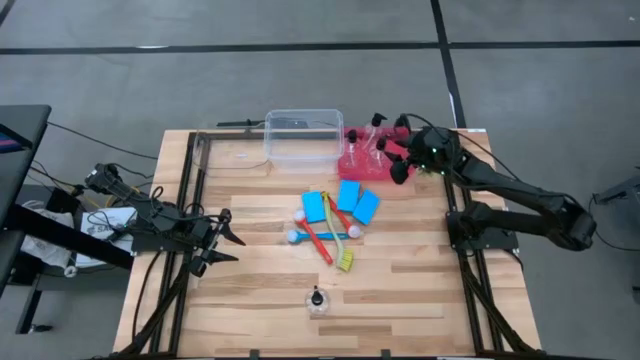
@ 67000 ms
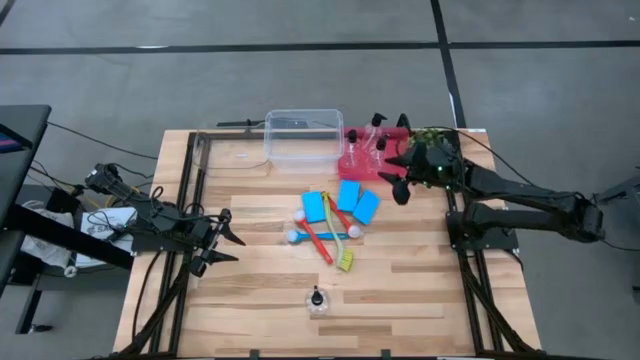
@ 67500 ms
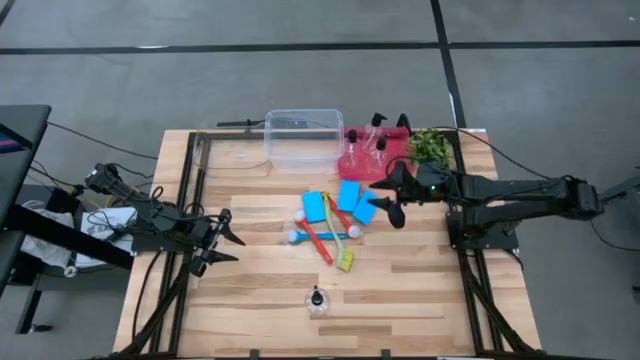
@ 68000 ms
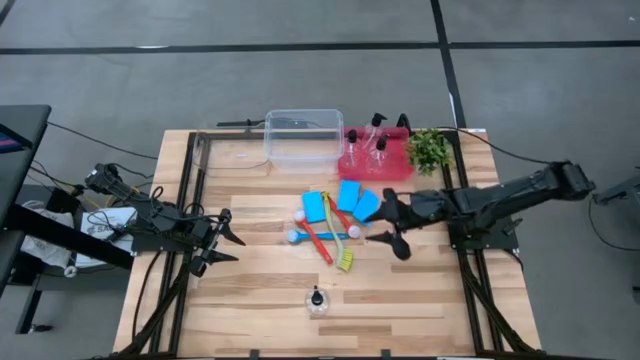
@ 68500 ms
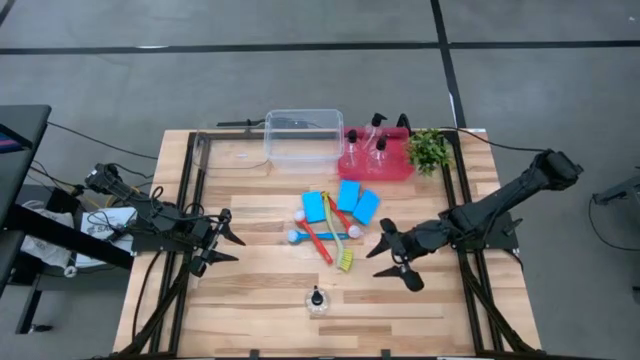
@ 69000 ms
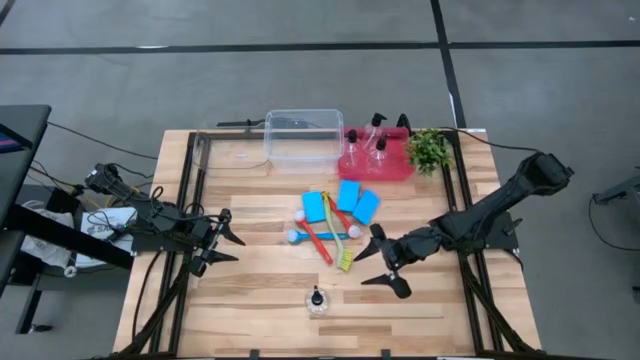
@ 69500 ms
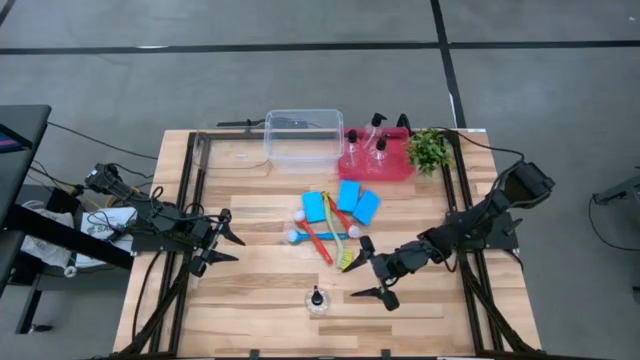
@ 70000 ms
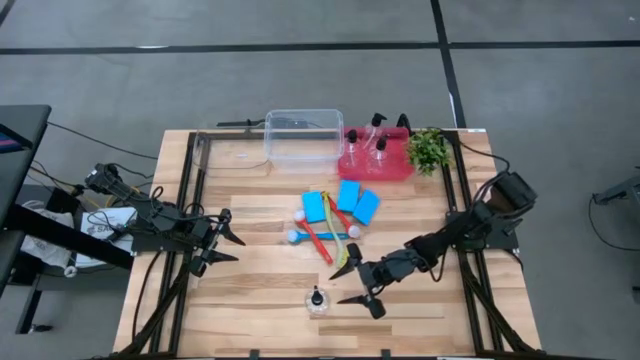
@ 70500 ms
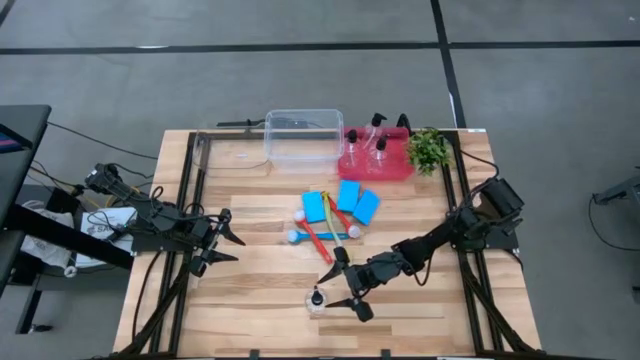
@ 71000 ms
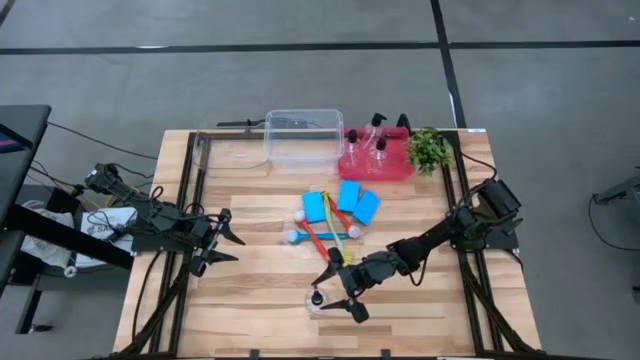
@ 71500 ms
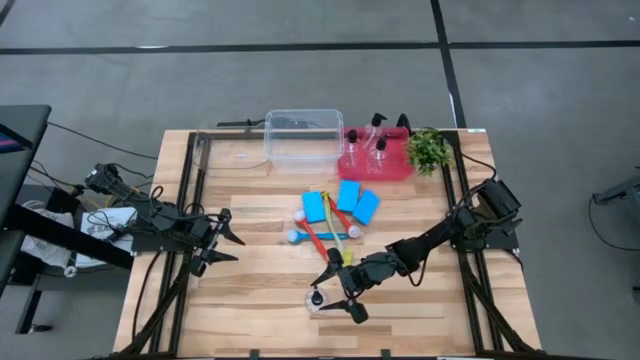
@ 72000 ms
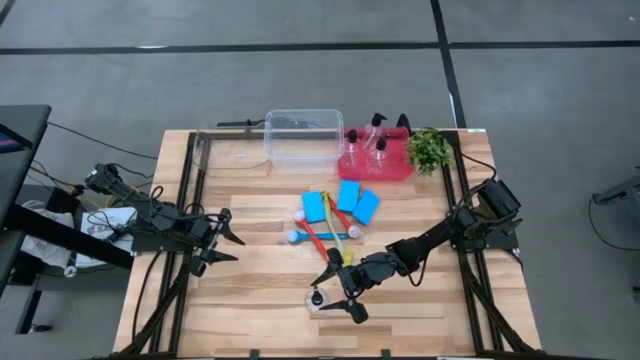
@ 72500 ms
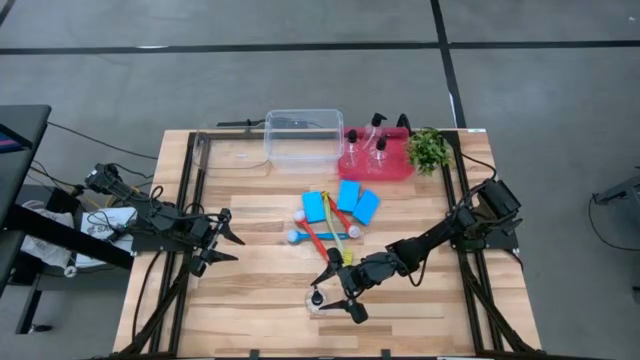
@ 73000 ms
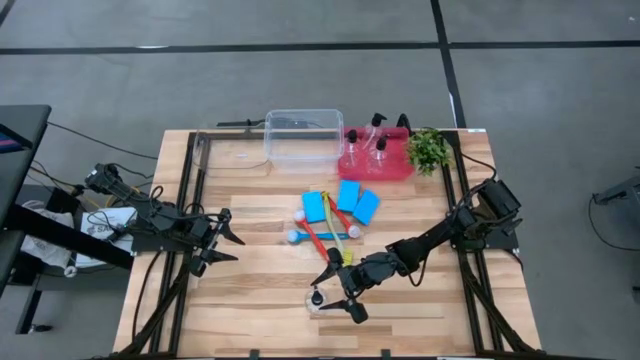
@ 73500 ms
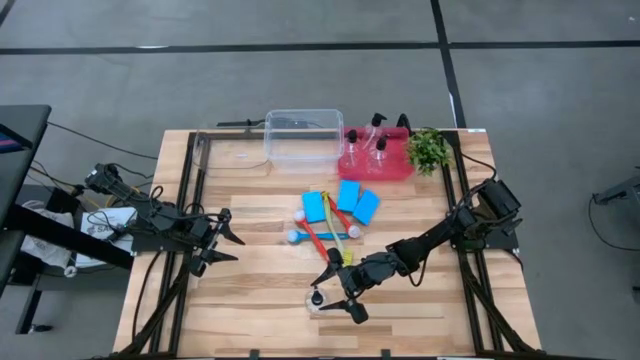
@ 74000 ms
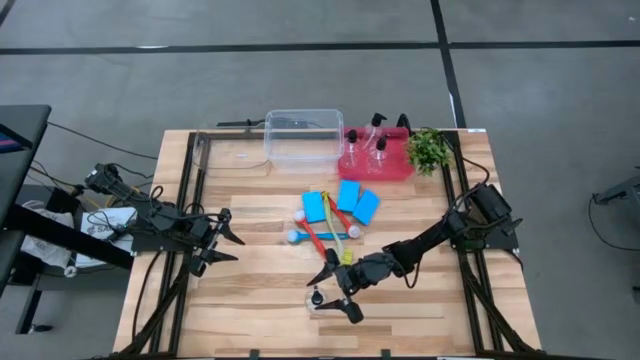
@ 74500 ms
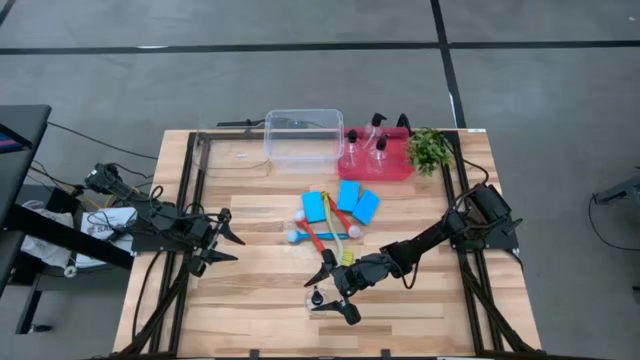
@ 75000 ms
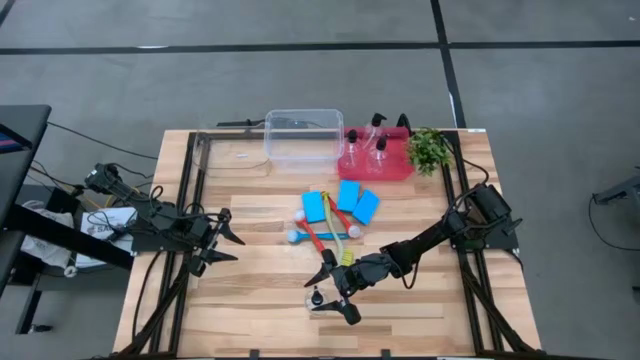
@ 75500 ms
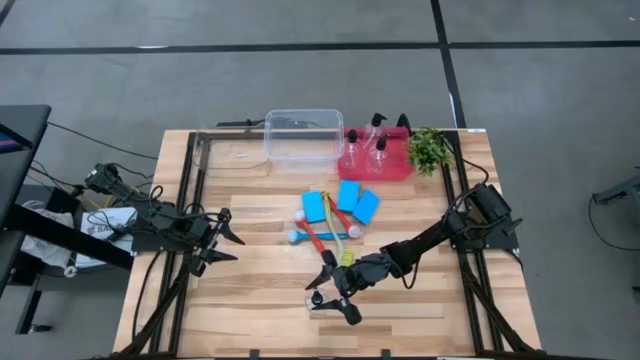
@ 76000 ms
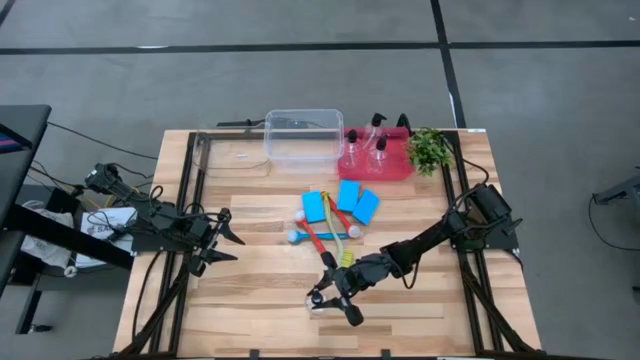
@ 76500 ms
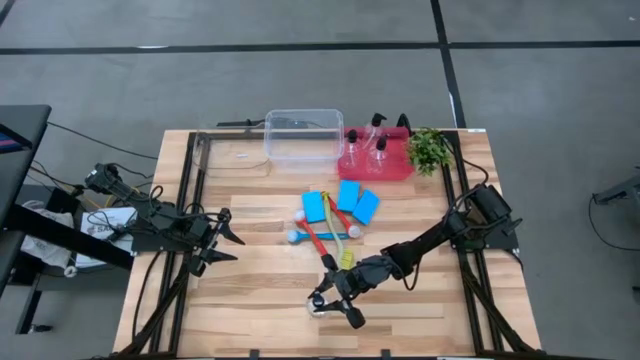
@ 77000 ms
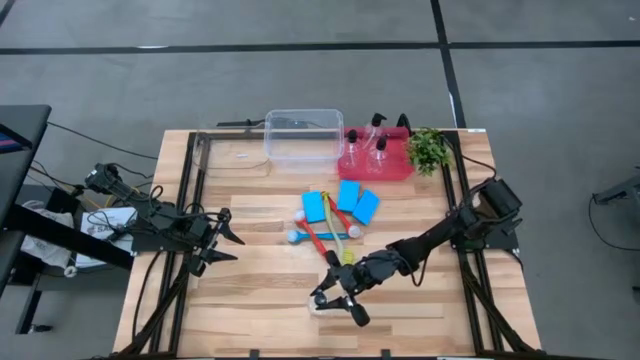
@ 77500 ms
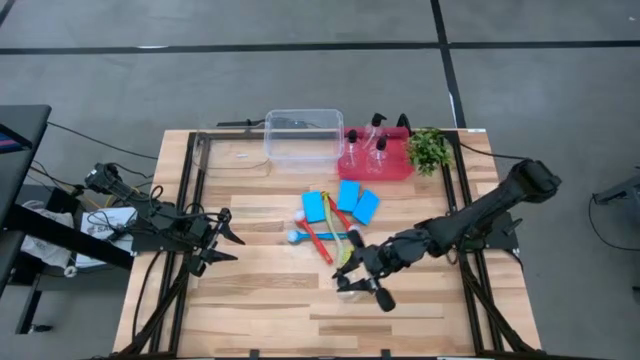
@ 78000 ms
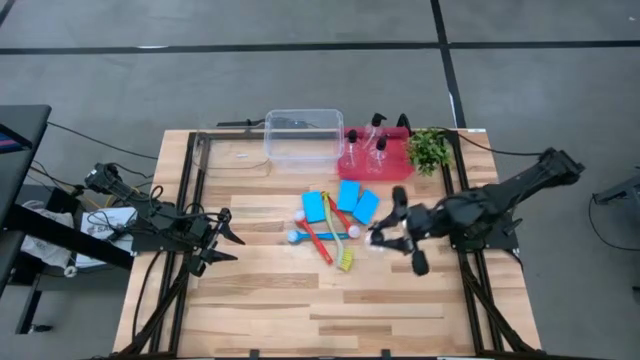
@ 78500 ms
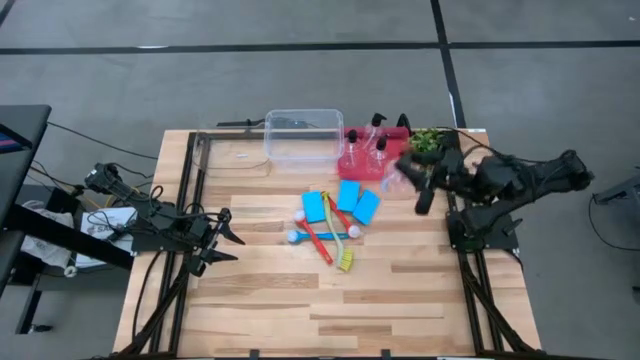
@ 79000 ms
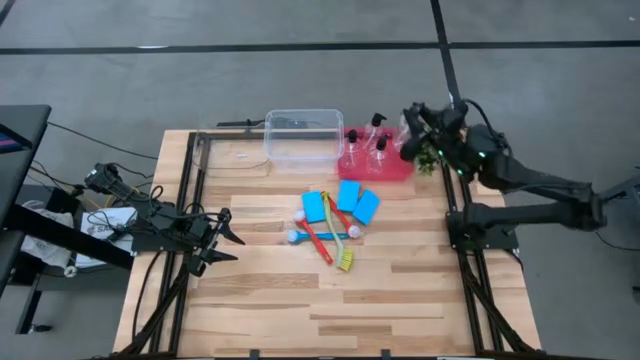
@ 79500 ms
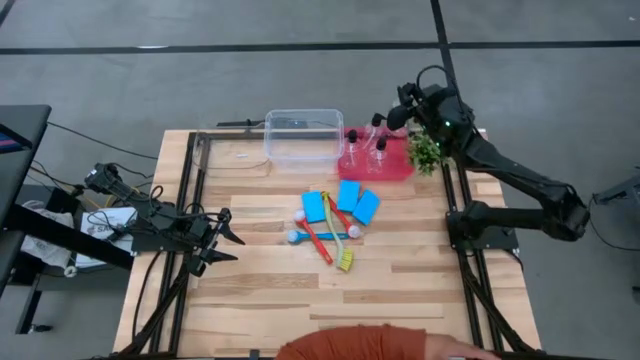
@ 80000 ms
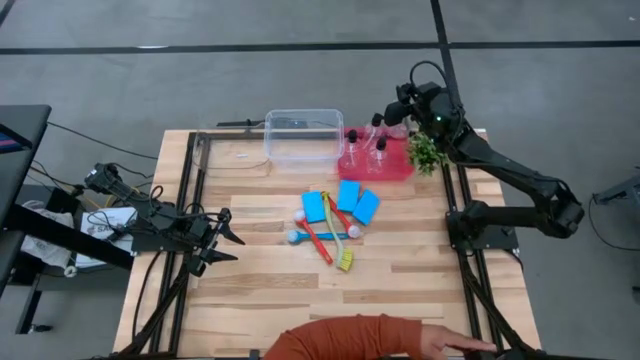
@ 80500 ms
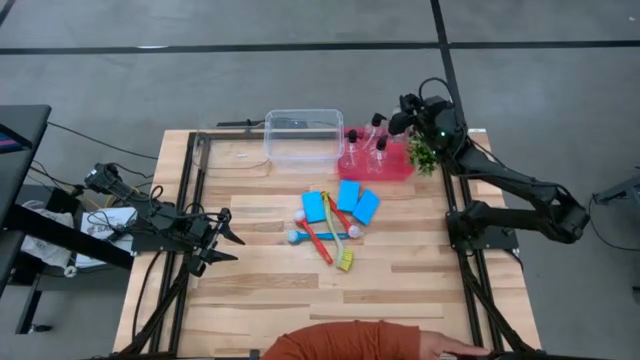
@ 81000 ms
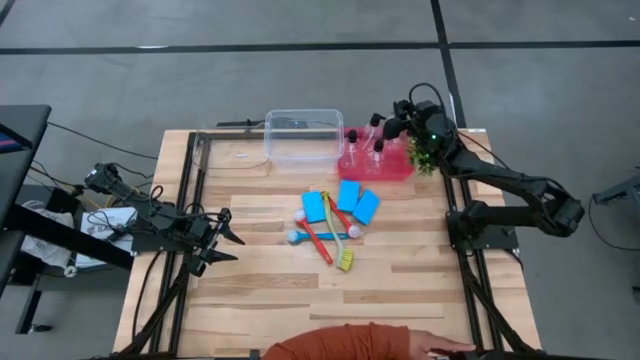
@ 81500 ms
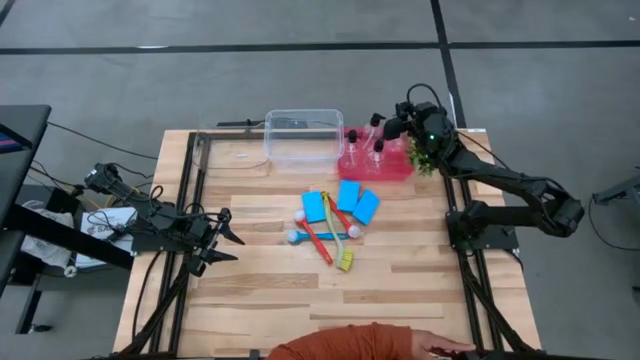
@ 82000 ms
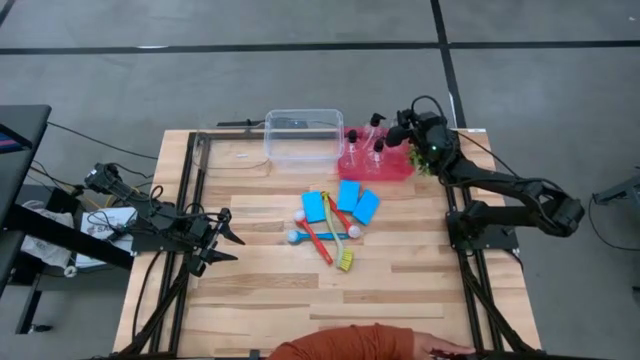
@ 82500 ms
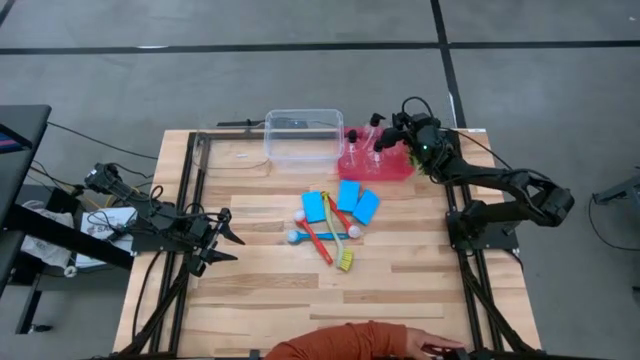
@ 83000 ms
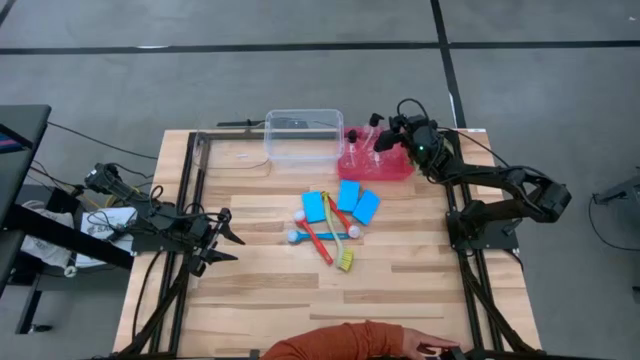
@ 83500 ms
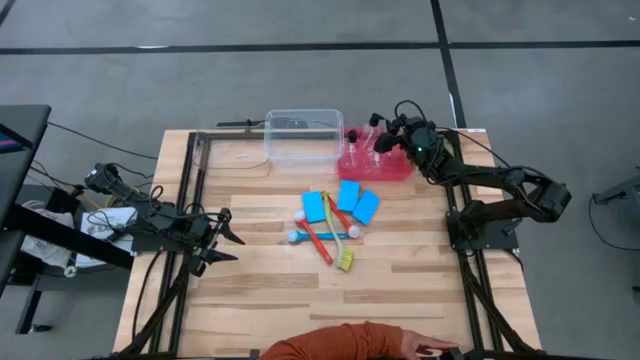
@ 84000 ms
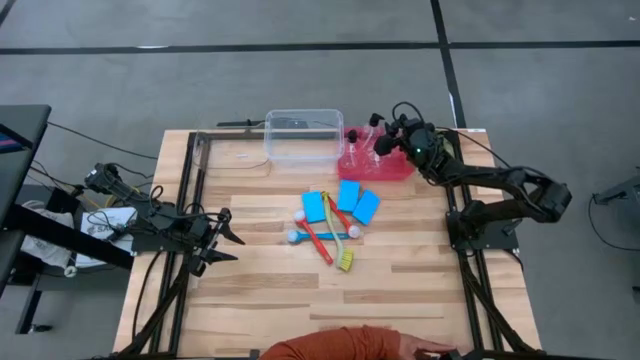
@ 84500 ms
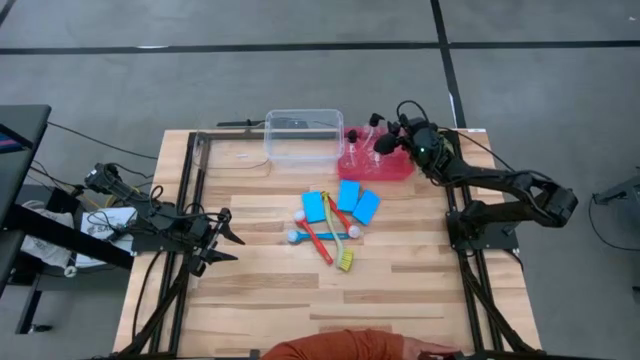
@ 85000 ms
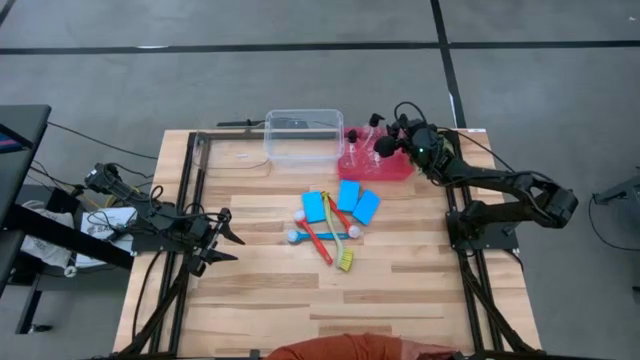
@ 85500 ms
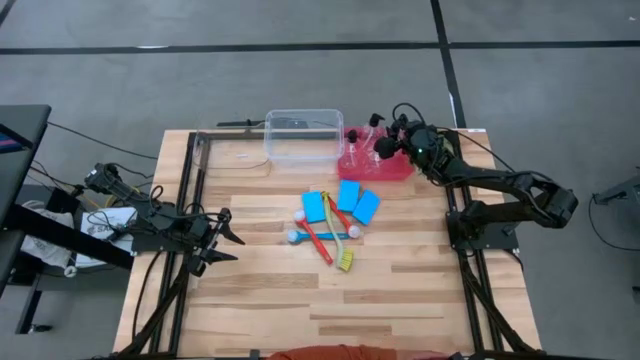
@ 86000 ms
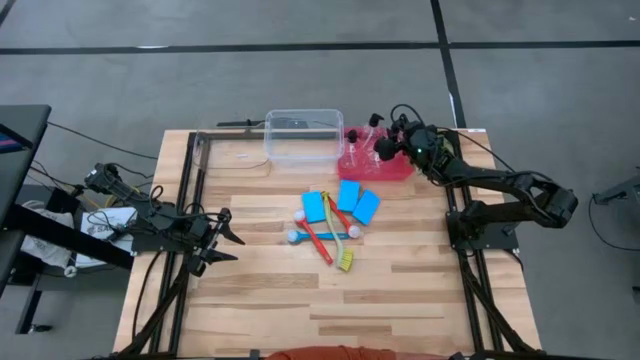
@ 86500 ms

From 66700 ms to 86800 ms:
Task: Pick & Place Kitchen Sink Supplies
Put the transparent bottle into the red bin

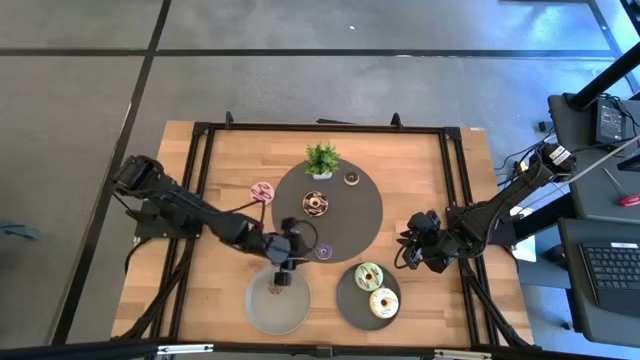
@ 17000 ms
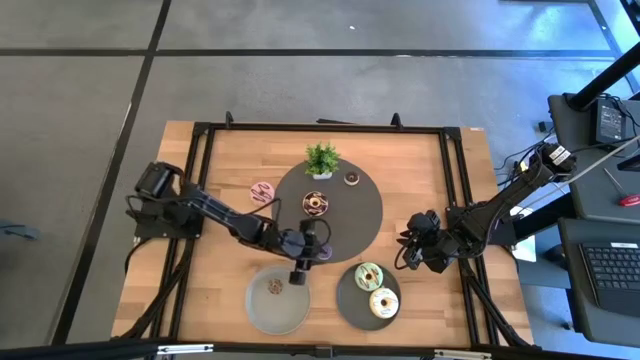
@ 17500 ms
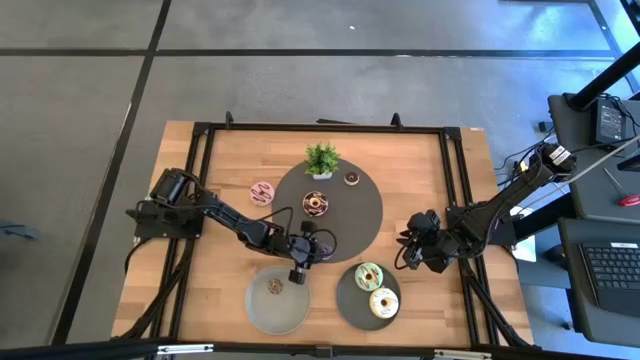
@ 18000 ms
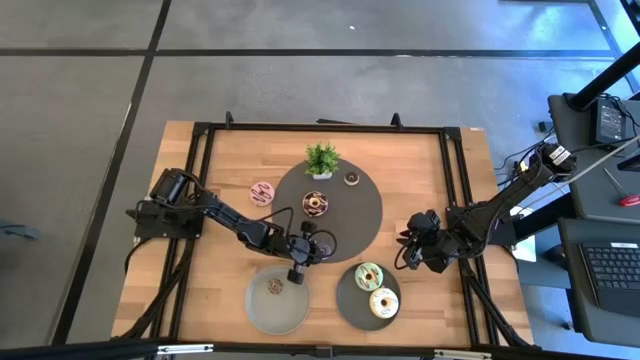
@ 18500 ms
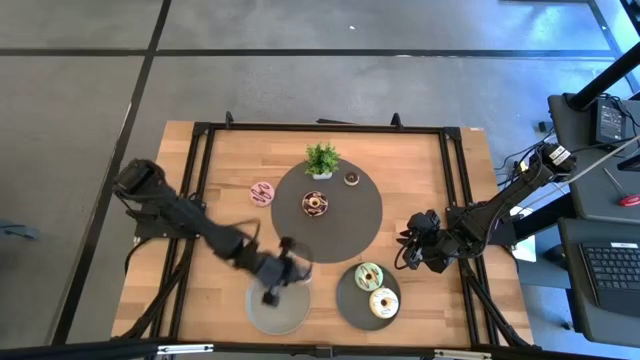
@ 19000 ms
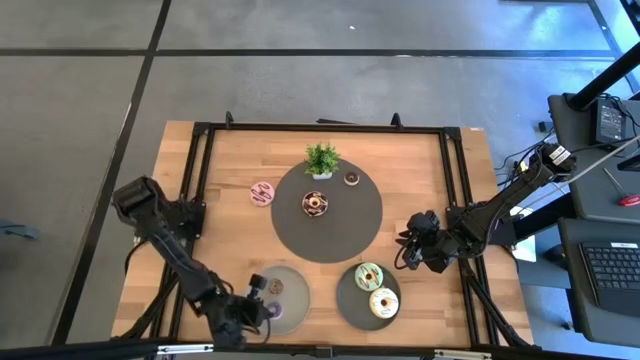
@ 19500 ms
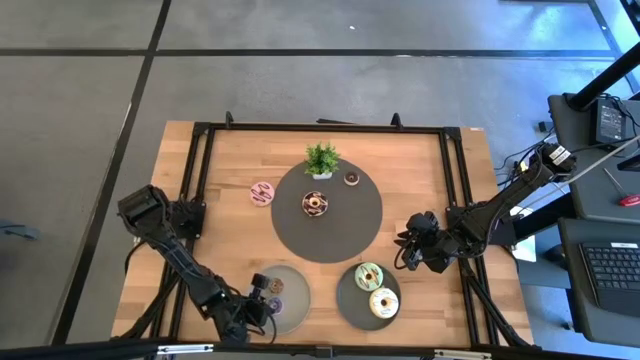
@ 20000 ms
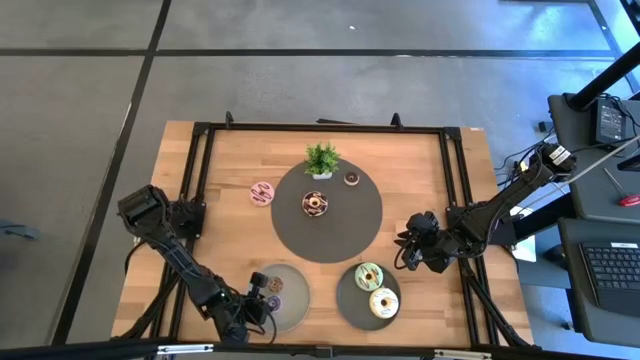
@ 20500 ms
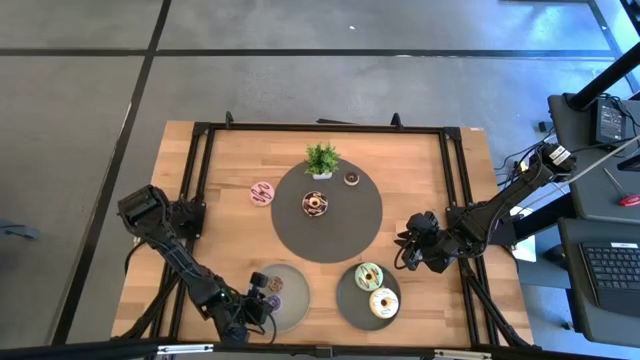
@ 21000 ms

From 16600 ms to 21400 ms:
Task: Pick & Place donuts
Put the small dark blue donut on the gray plate
